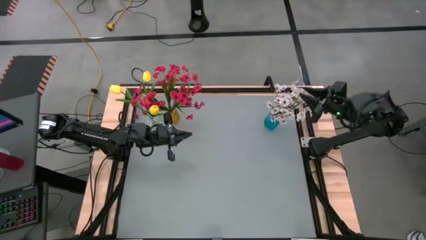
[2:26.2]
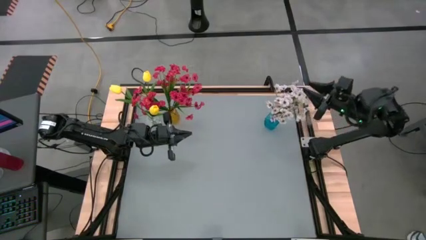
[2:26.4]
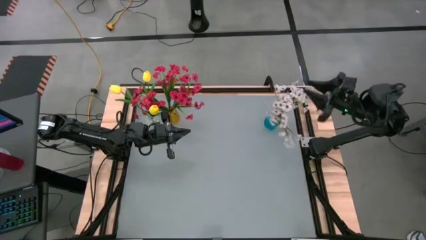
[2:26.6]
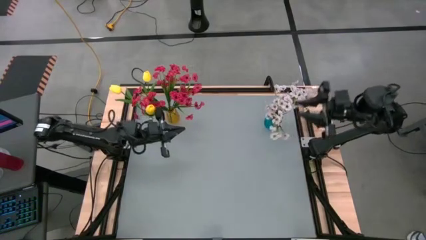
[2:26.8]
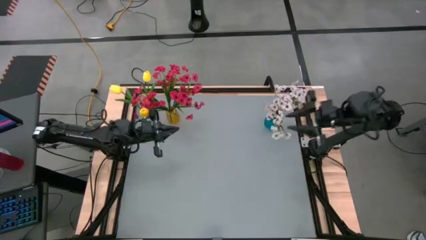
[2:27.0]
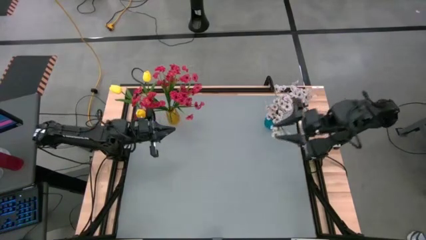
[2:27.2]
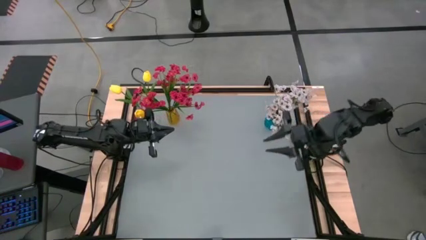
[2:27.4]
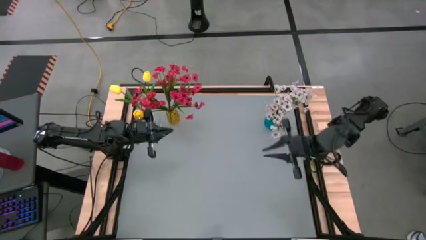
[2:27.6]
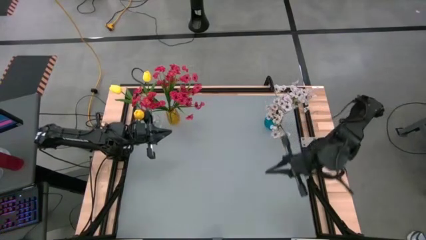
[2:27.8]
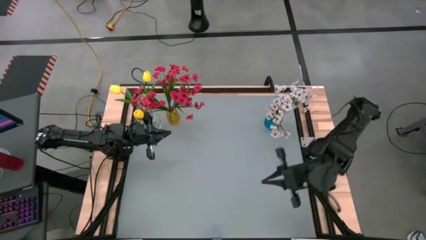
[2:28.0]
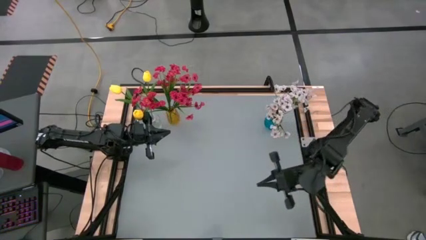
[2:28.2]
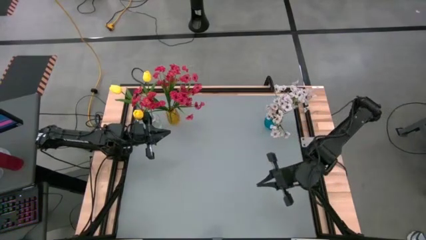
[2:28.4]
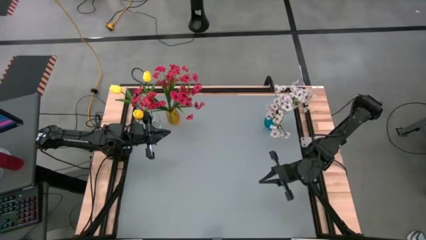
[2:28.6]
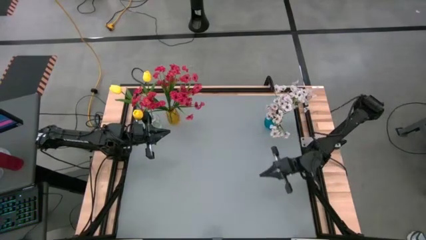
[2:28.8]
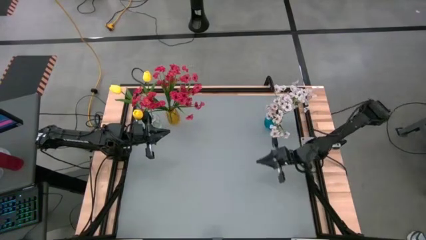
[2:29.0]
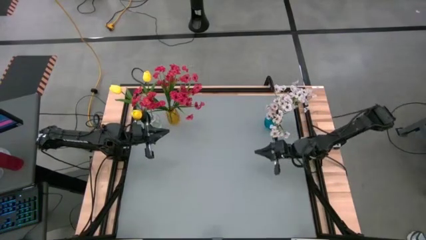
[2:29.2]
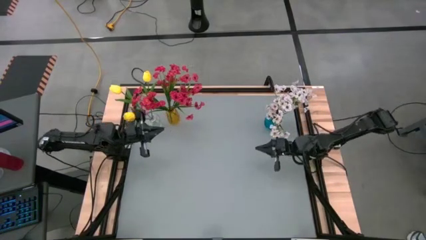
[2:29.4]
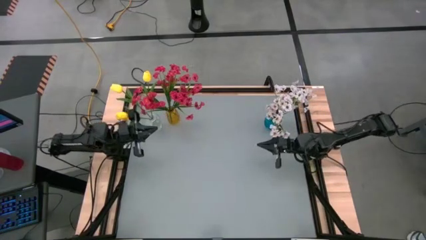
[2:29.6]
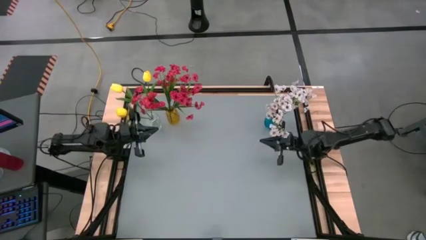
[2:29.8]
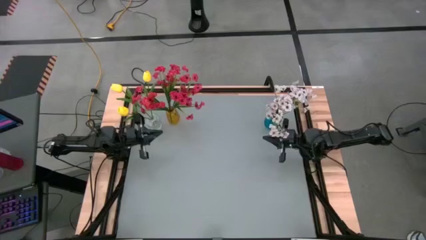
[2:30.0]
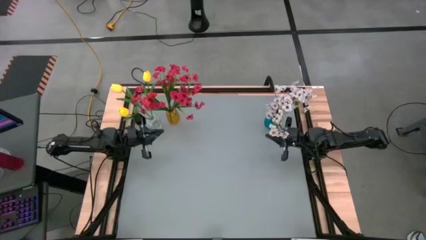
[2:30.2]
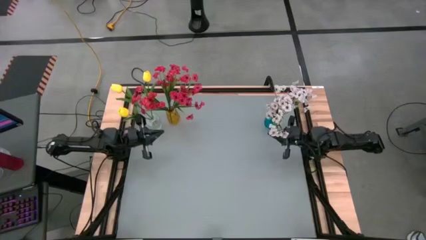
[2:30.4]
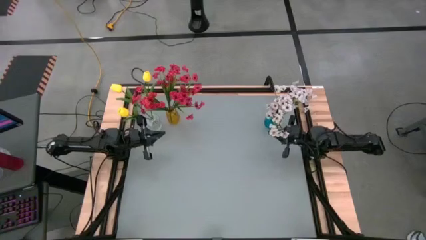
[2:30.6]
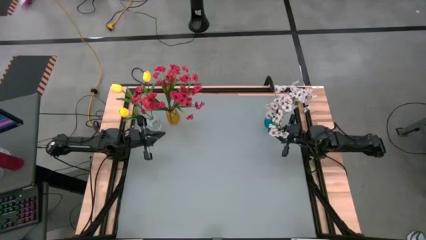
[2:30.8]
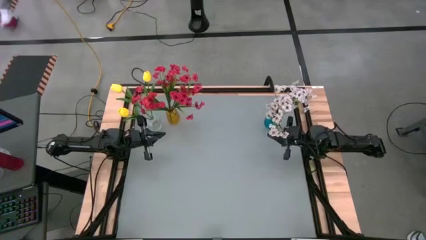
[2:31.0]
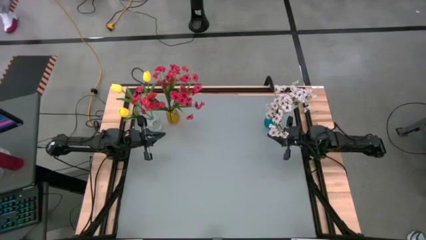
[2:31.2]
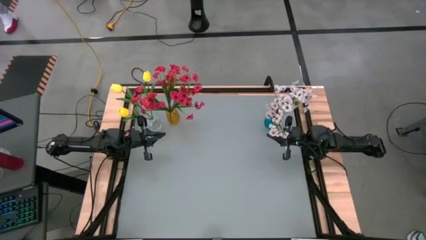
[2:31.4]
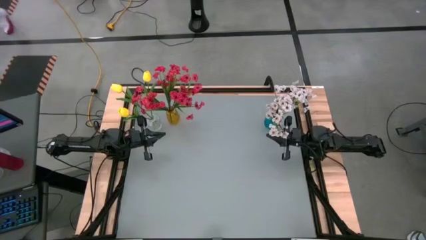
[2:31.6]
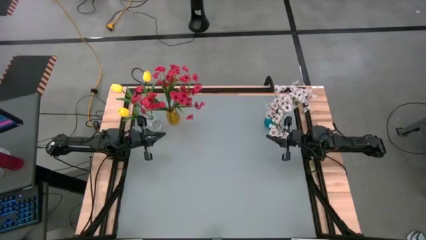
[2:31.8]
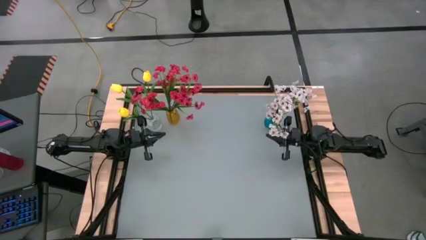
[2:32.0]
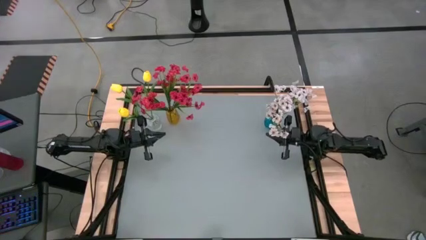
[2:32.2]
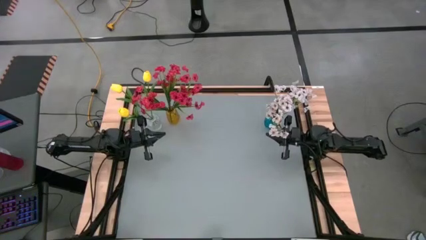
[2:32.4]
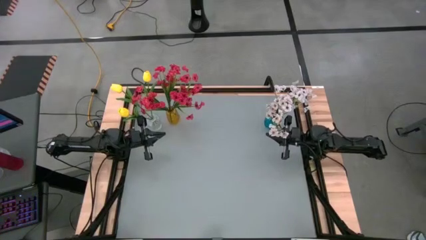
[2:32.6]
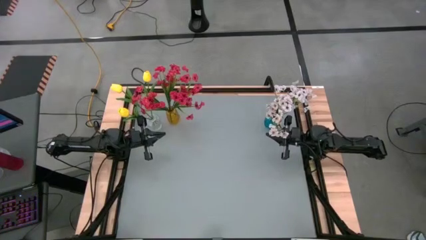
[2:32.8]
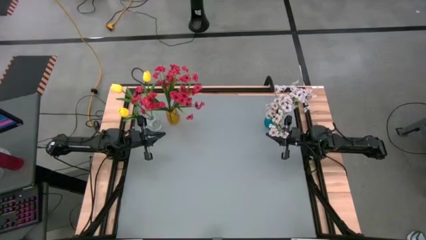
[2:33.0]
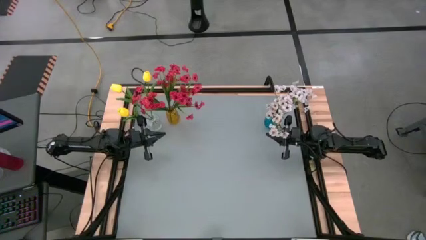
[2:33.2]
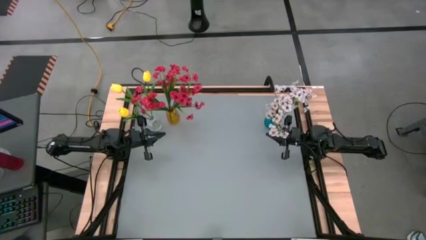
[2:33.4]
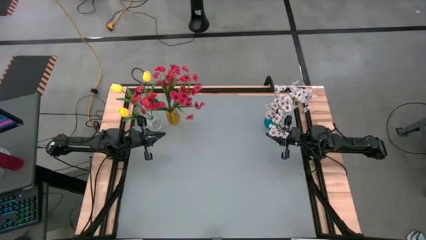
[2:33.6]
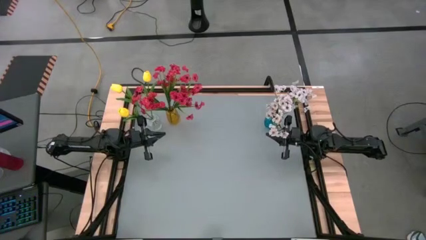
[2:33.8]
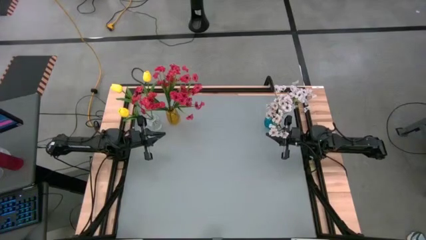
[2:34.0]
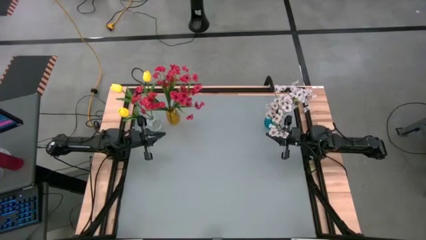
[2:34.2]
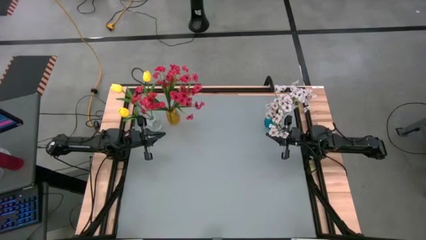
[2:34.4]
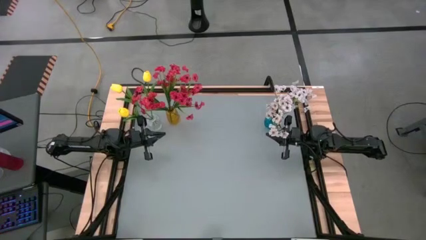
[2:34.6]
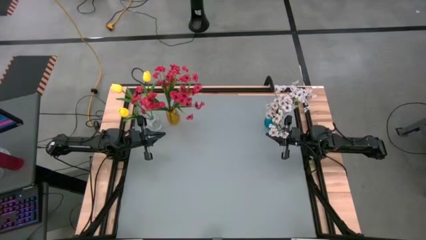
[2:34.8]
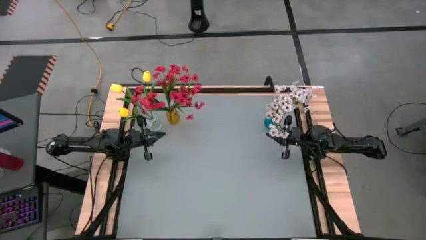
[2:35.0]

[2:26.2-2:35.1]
Task: Sort flowers into vase by color
Return to Home Position

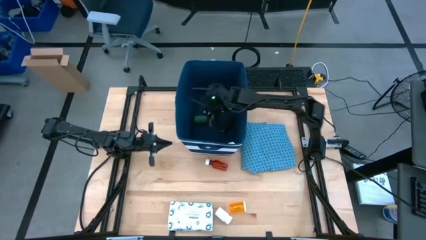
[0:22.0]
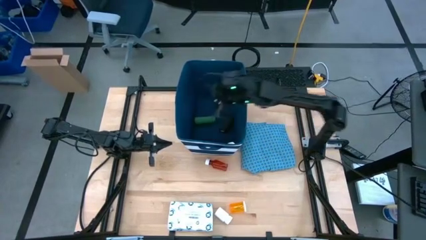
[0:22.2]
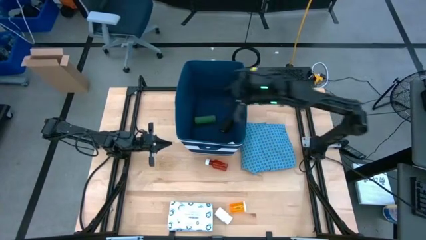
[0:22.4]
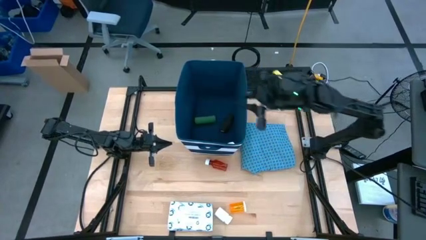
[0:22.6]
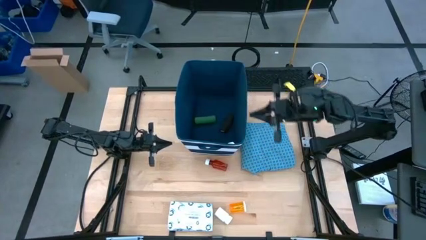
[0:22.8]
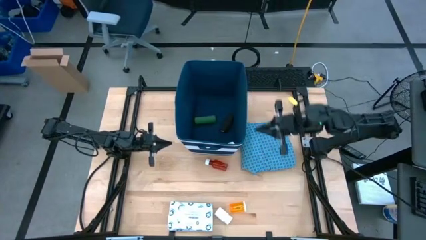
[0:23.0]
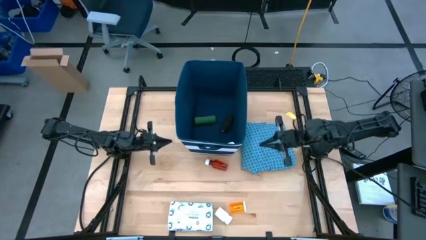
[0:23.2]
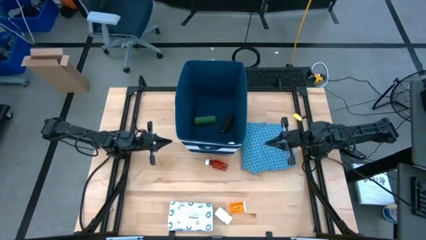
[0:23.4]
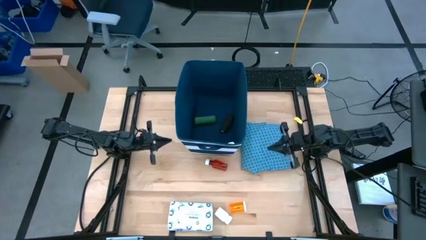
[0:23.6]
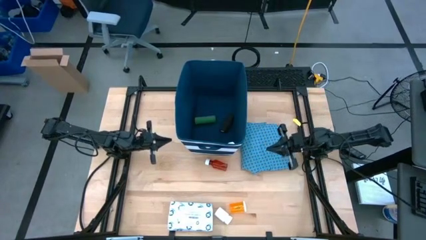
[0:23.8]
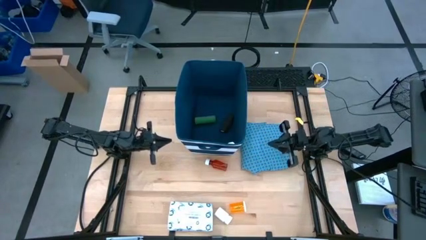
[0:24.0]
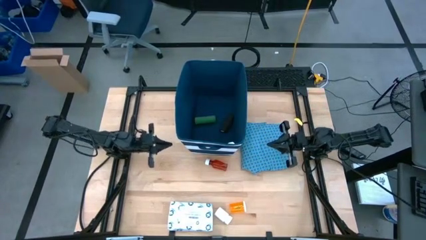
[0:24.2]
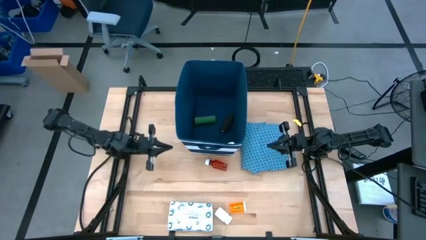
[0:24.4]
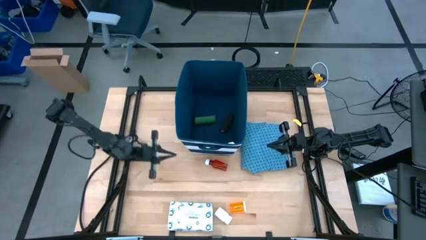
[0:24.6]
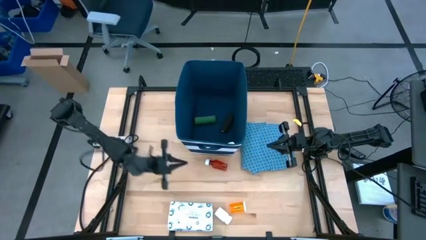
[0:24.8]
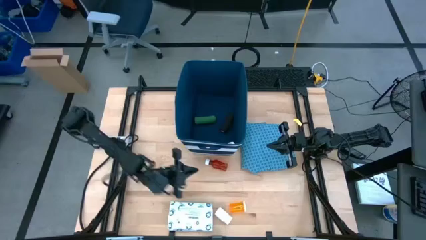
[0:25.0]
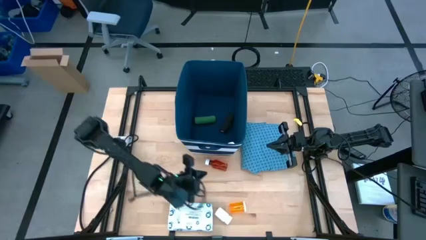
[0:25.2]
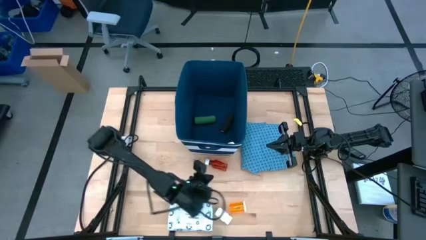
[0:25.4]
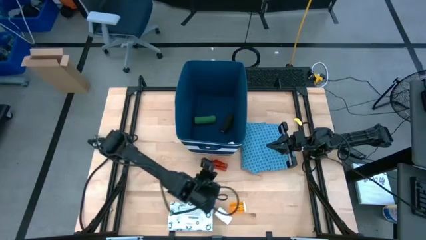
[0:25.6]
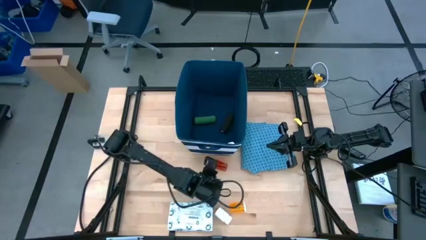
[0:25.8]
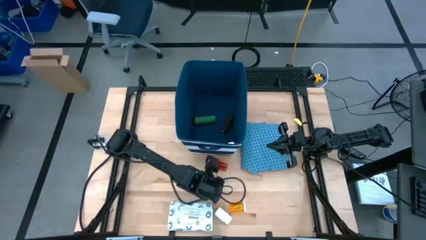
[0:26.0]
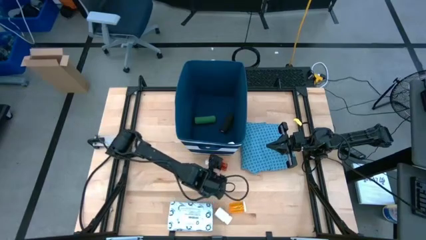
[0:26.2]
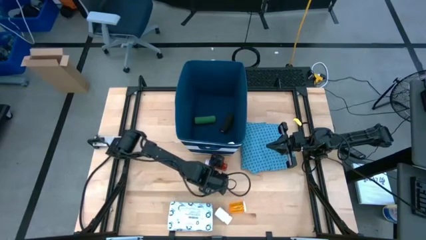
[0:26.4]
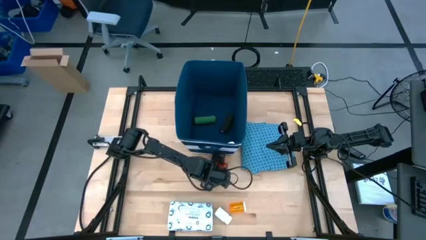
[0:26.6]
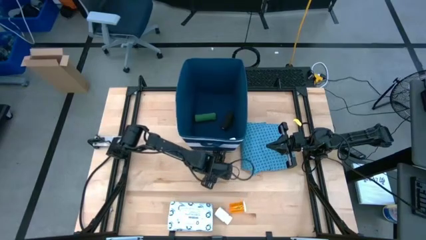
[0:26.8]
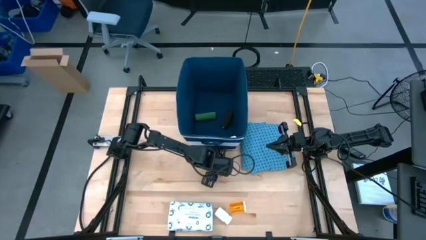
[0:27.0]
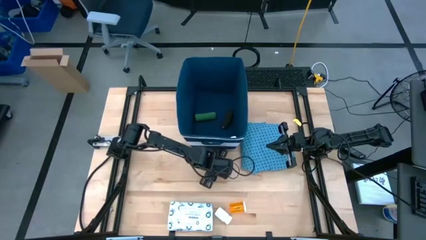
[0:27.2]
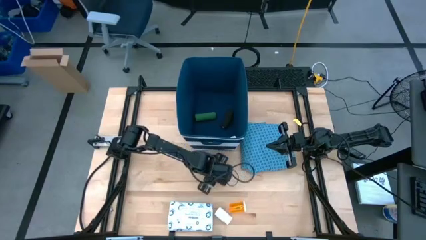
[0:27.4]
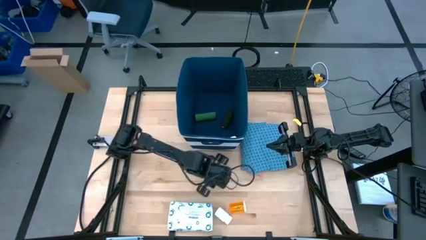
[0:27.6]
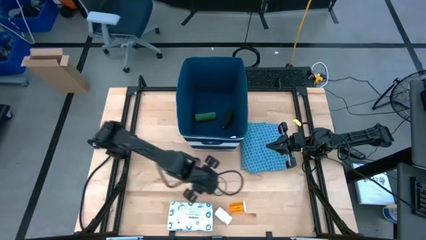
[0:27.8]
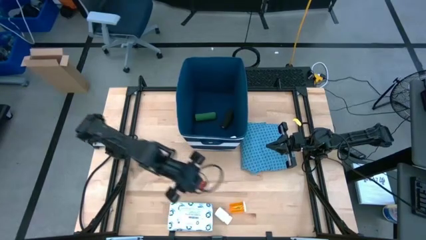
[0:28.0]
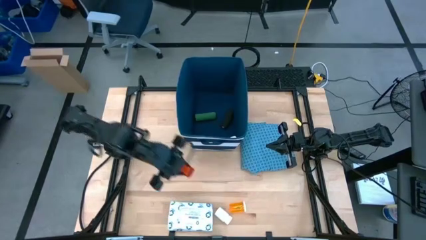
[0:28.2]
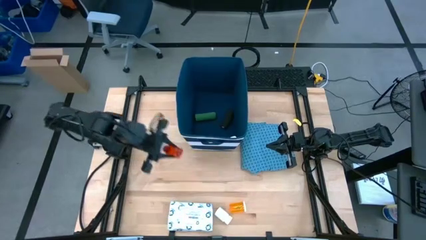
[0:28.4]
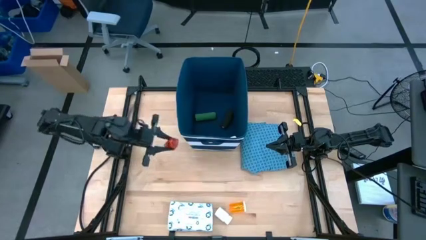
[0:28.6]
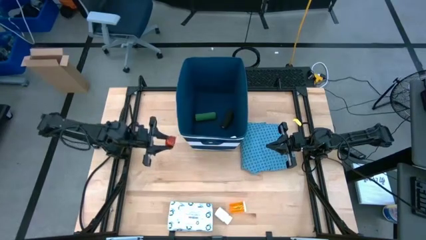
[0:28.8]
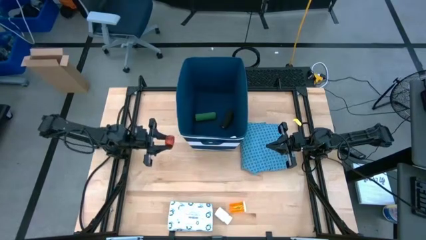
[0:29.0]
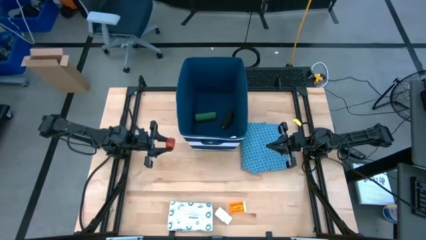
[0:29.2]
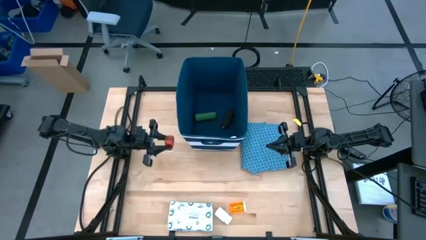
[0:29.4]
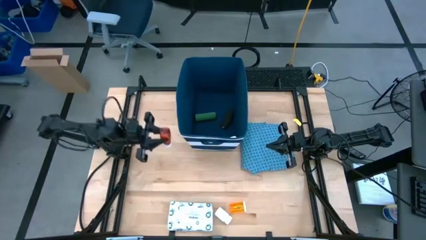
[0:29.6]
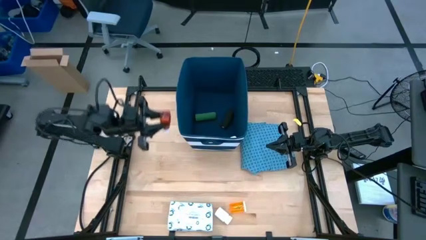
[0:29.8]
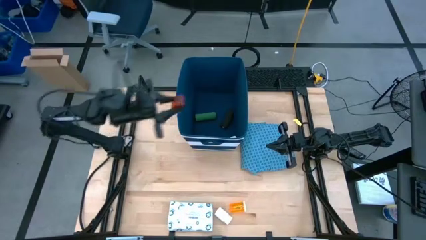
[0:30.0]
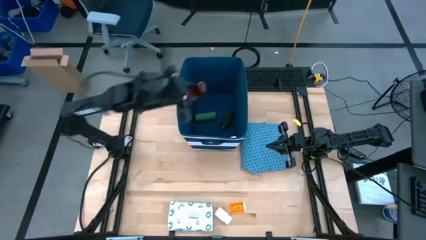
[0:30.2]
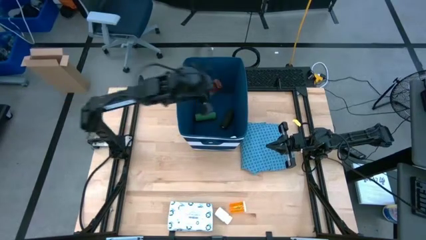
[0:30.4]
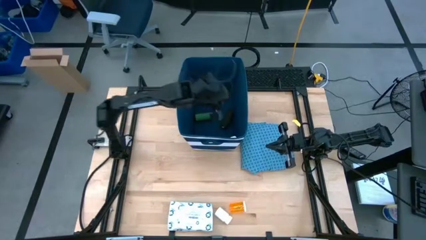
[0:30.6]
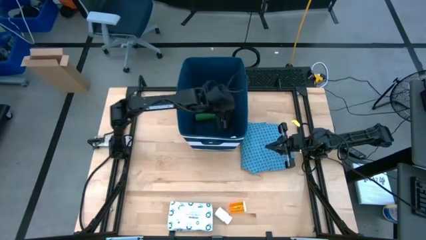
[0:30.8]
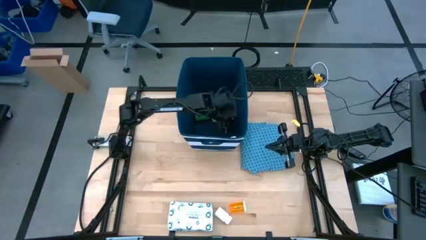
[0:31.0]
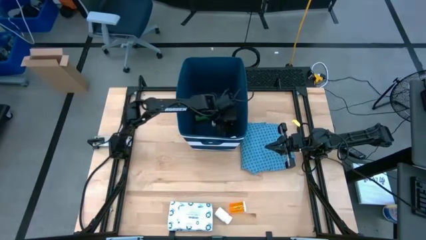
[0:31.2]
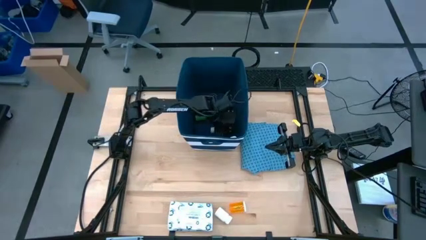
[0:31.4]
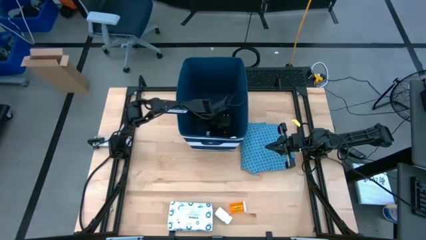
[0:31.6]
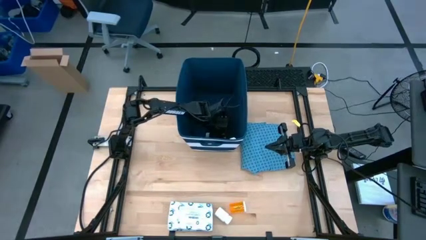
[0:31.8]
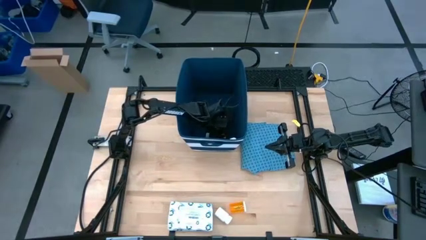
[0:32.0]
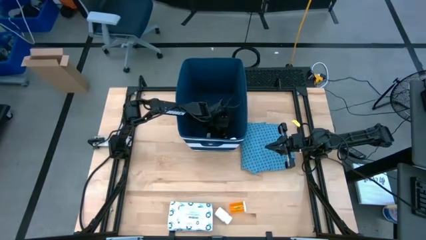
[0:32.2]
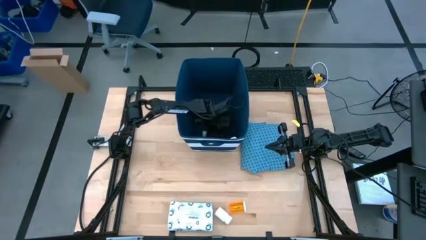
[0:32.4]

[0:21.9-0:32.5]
Task: Pick & place medical supplies in basket/bin
Put the orange medicine bottle into the blue bin
